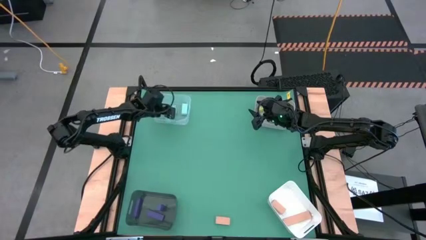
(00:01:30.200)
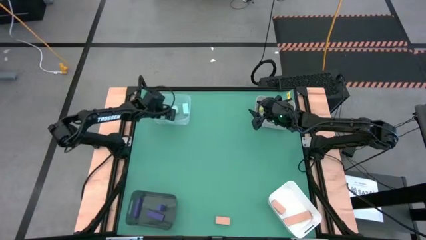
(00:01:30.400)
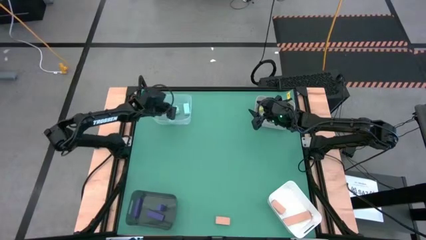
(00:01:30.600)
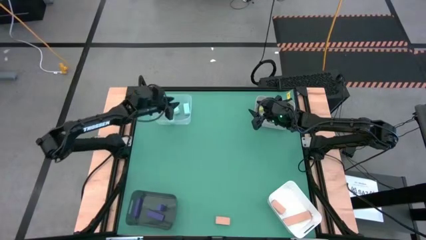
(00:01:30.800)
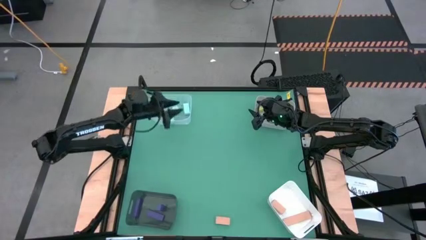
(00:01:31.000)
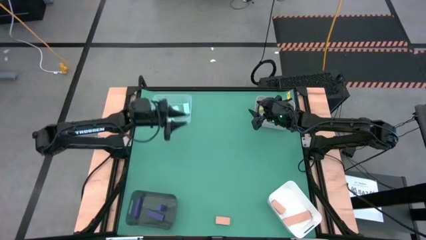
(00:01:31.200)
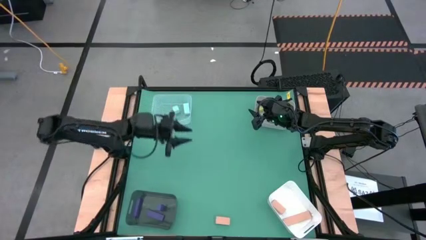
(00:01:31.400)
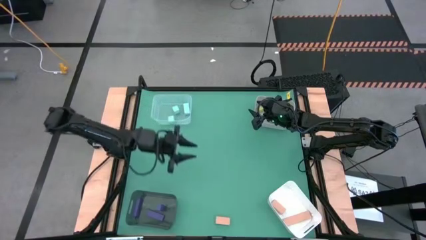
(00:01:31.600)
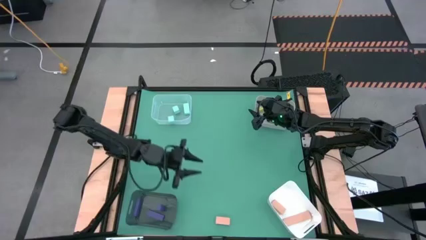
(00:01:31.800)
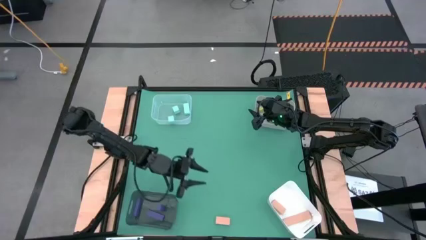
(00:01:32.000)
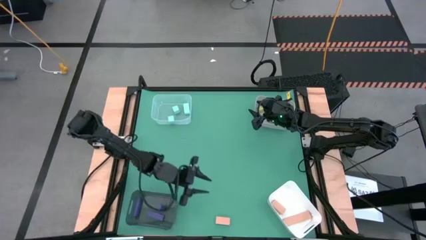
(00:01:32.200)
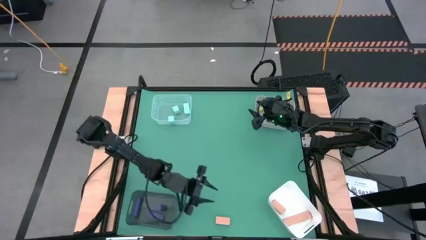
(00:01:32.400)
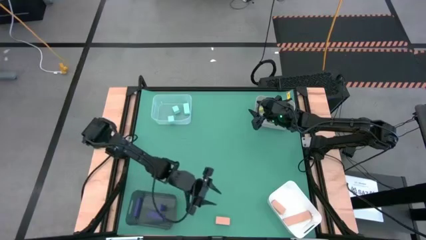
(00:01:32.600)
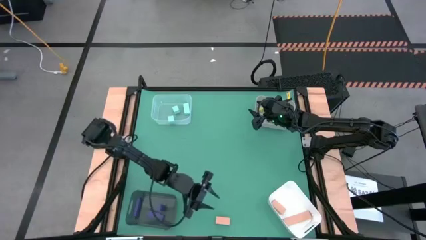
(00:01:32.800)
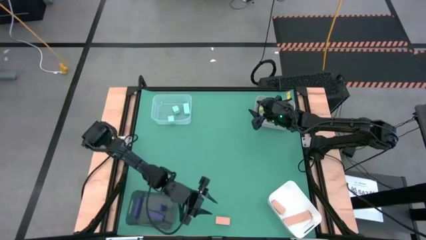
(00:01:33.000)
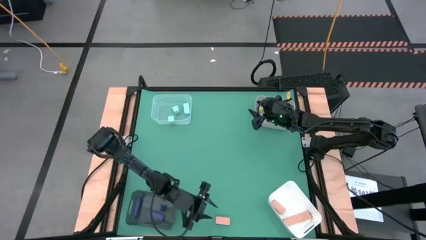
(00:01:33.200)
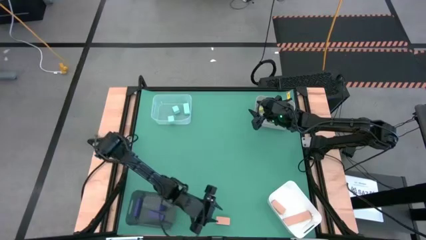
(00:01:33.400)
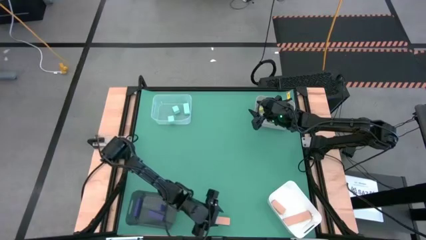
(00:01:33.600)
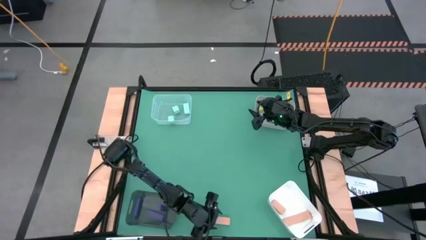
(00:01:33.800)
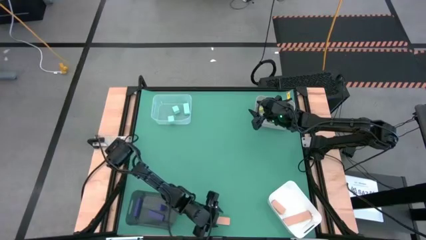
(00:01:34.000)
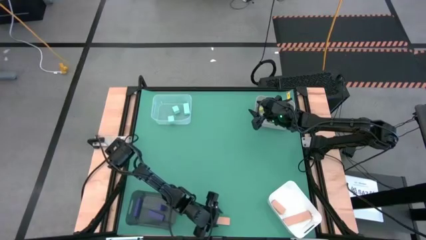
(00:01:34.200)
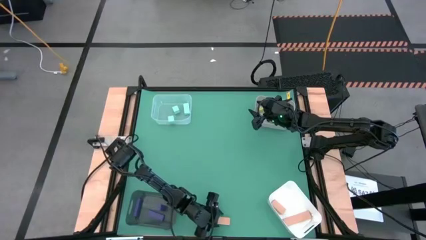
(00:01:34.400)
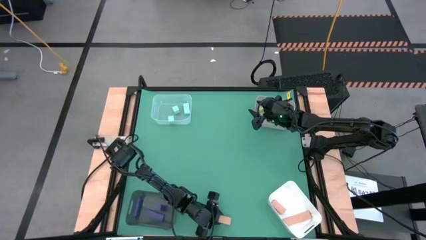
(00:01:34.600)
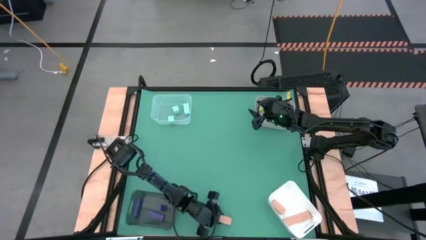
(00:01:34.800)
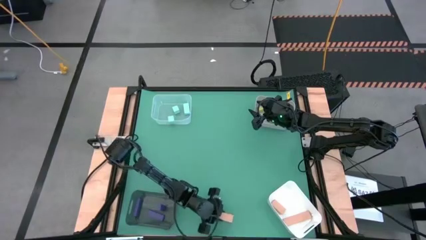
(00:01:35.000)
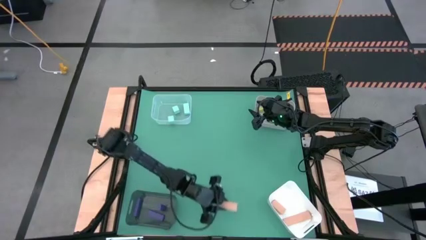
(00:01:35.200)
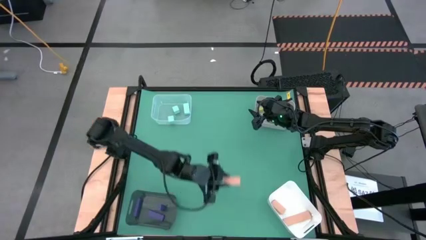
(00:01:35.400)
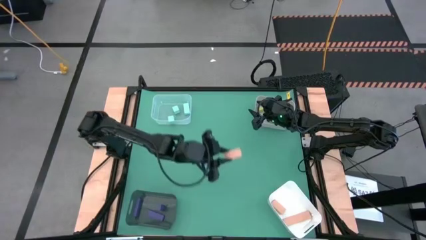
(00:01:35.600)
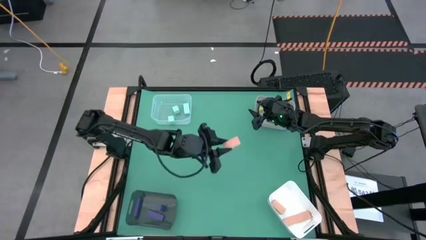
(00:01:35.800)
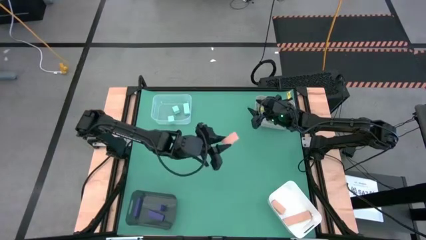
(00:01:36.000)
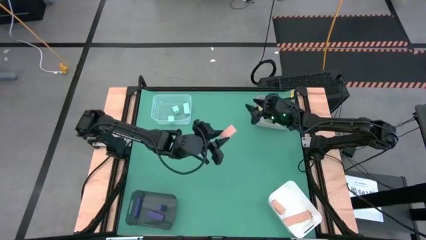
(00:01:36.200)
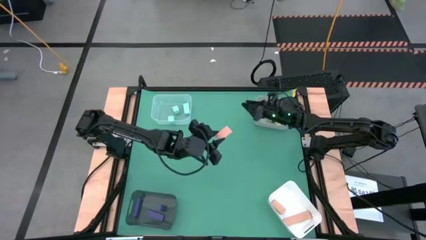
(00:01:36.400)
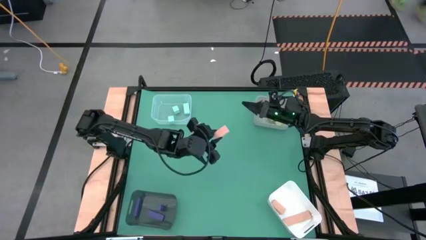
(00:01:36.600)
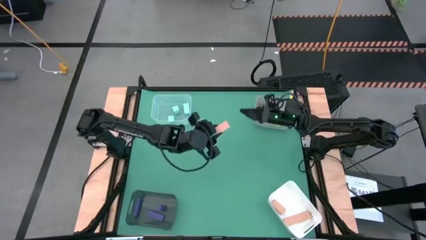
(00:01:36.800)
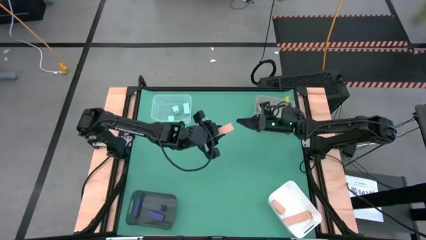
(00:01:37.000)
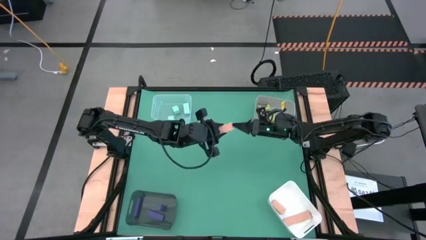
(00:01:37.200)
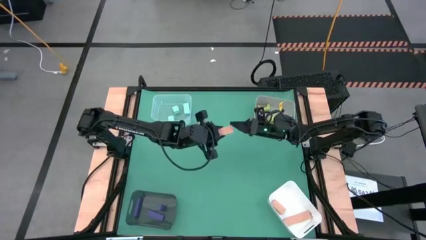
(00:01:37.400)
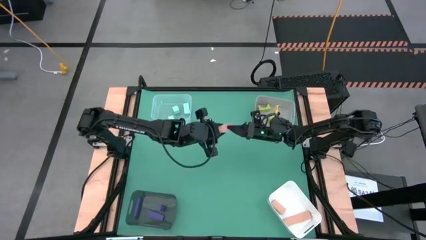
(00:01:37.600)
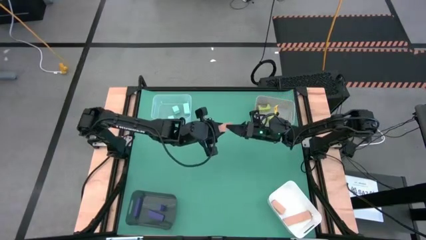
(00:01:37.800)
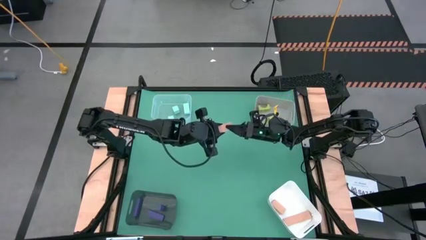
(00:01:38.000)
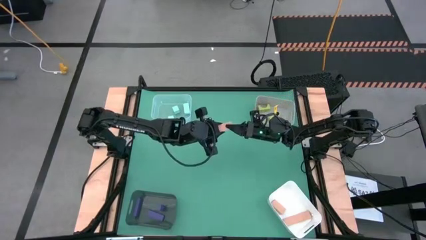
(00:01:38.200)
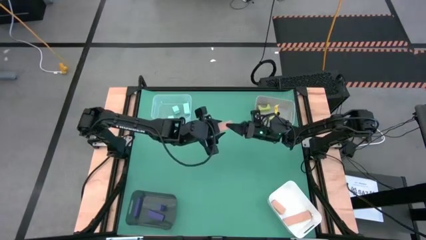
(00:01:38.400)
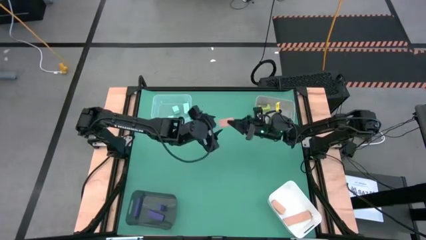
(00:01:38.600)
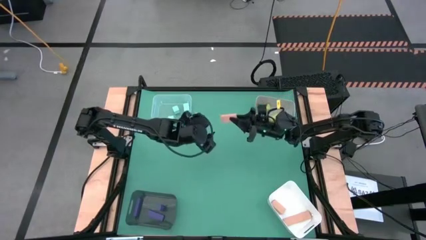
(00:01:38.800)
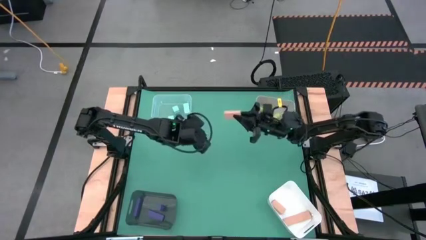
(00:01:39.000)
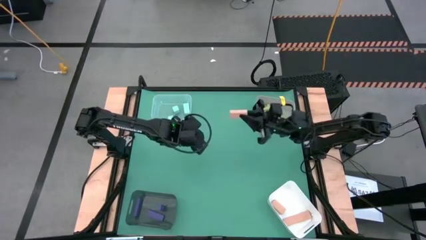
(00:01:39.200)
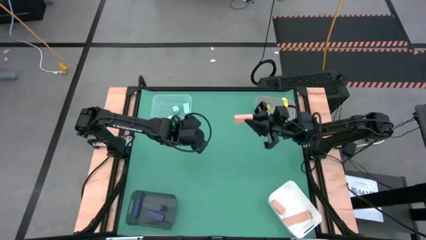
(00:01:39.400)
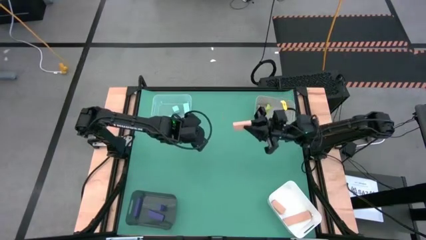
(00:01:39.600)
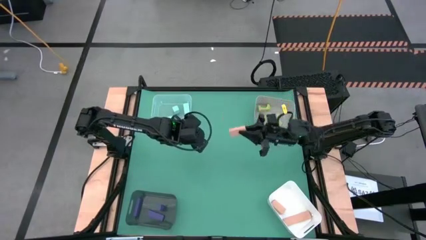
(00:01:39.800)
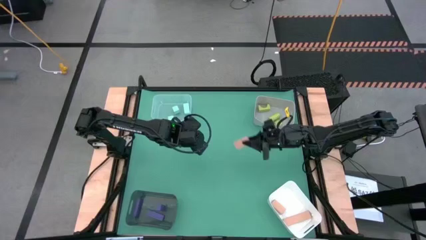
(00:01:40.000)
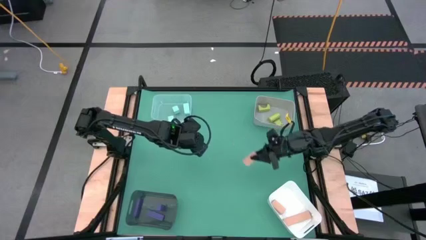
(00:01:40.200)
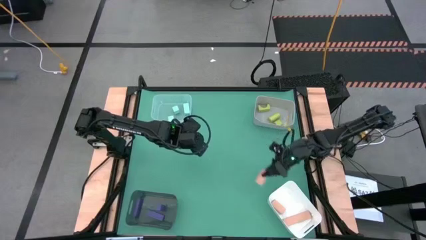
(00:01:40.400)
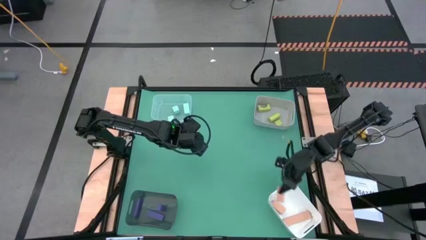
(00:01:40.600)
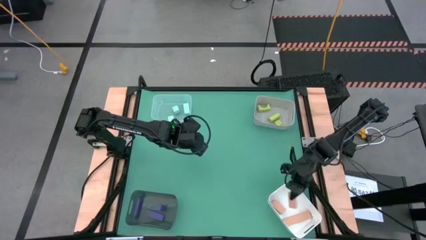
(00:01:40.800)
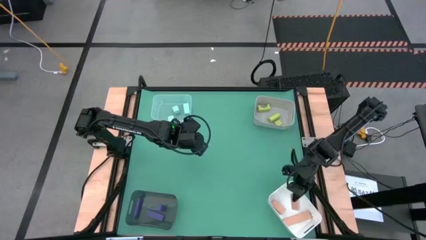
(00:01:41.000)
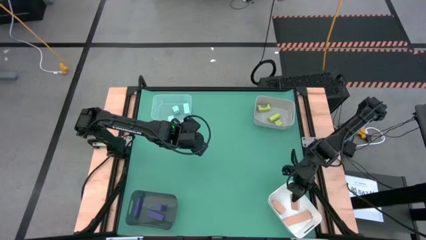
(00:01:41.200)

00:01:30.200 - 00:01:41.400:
Task: Sort & place blocks by color
Put the brown block into the white bin

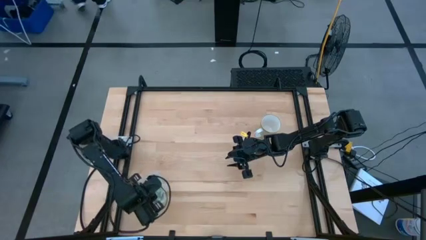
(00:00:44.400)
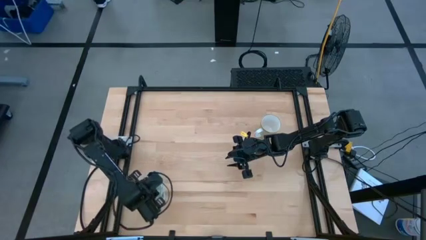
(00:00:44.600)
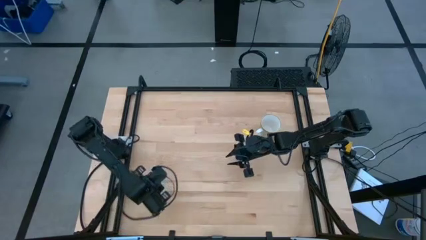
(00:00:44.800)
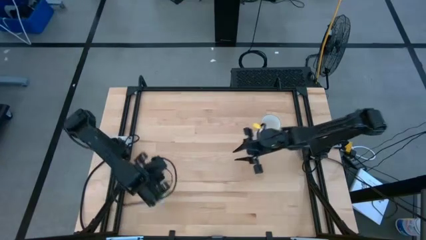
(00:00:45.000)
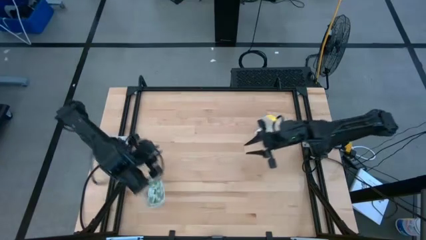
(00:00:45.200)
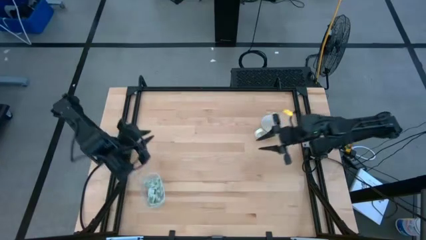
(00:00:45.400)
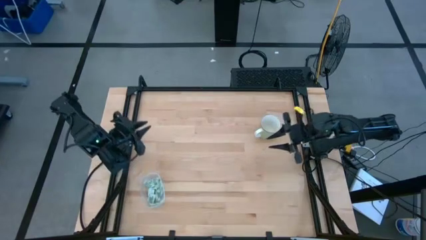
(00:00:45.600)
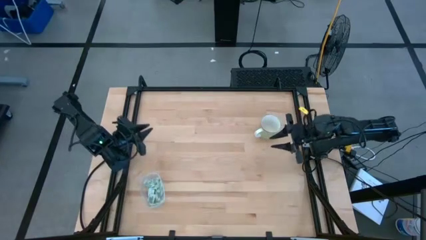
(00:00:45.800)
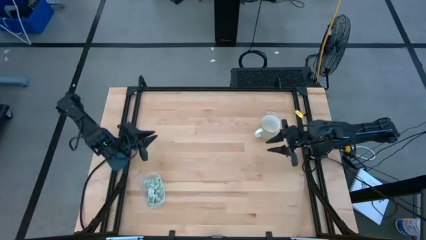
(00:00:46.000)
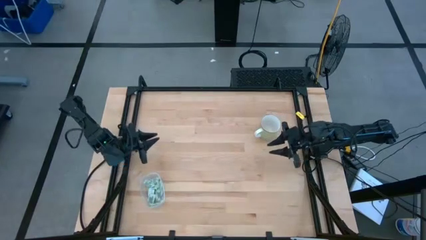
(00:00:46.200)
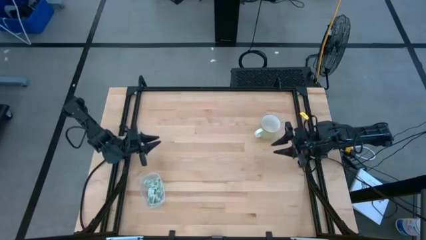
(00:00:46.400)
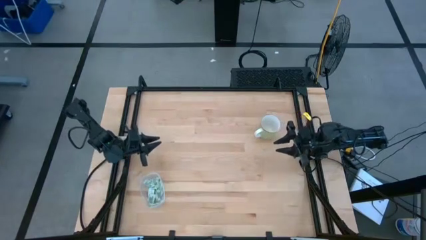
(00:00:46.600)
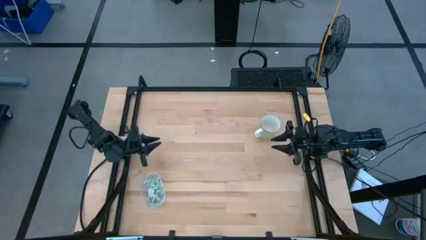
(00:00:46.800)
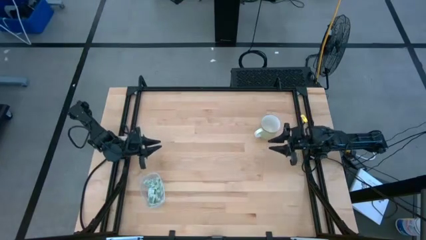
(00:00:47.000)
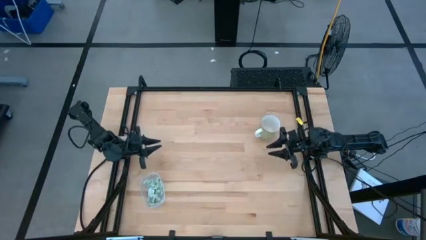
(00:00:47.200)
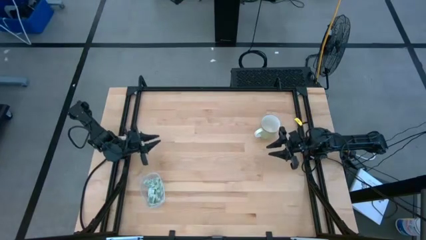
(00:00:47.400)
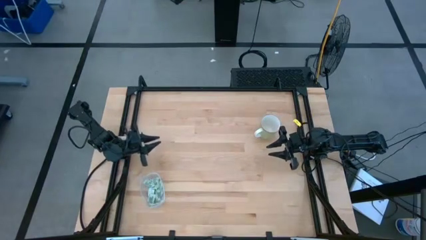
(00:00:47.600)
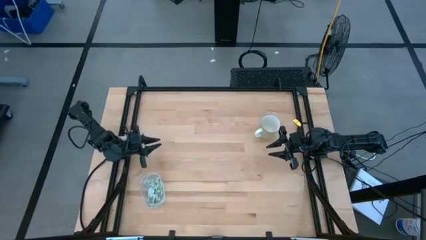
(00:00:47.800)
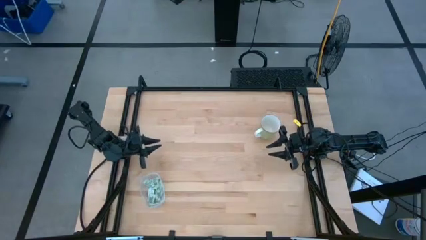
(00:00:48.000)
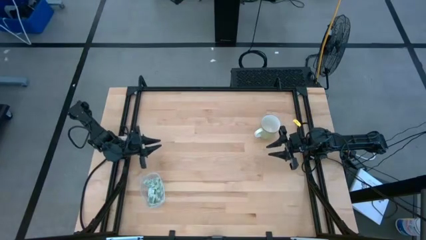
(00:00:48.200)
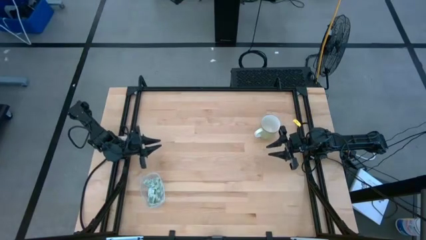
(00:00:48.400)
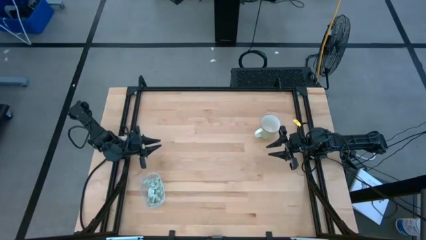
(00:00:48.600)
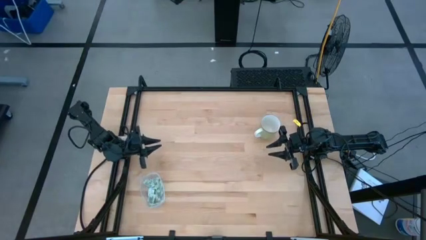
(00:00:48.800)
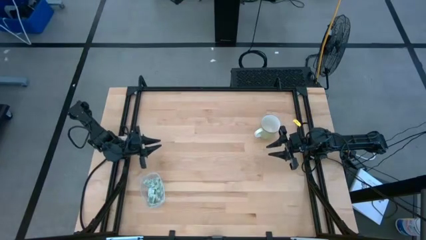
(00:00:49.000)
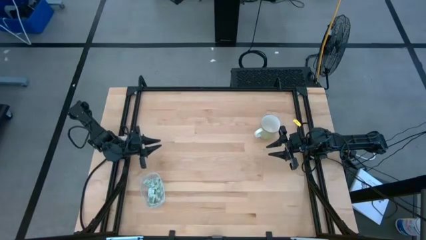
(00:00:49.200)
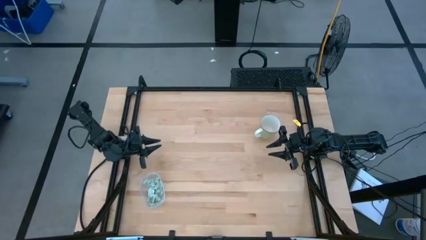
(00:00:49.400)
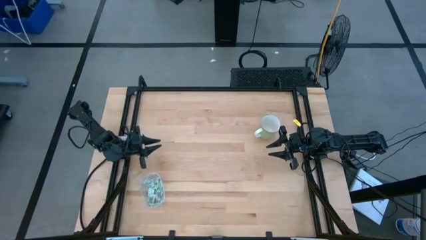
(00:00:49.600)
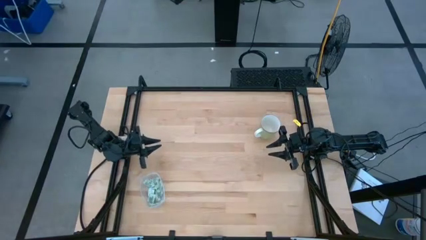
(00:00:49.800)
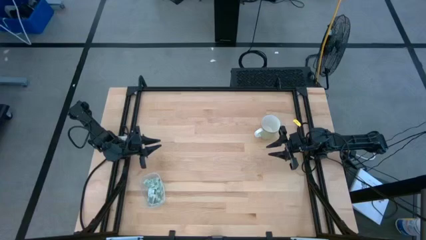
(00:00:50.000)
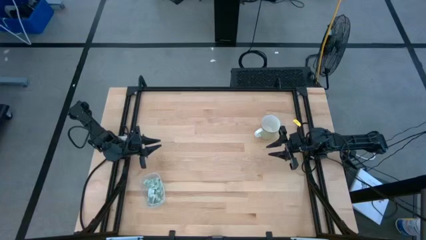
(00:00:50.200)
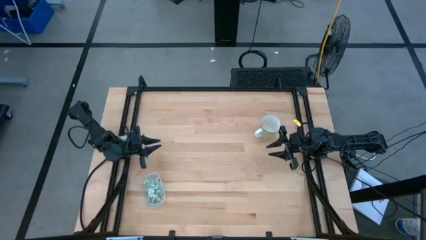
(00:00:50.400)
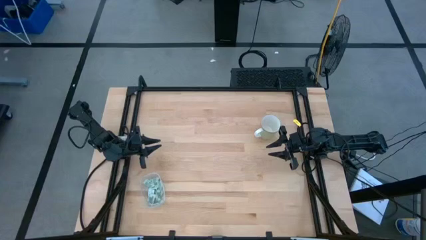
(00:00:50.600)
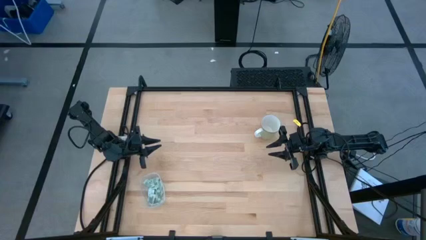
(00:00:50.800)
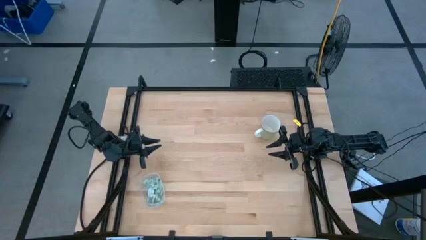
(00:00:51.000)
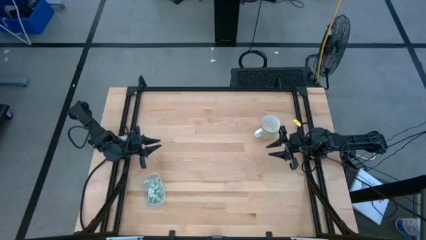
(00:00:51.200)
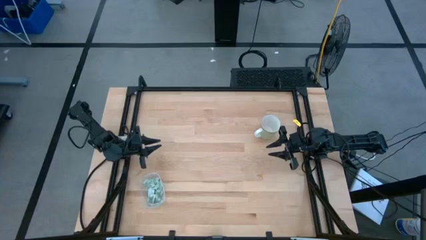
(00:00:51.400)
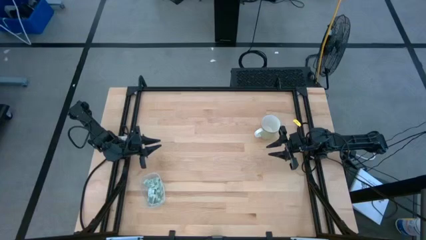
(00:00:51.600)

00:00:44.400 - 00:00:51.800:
Task: Pick and place Stevia / Truvia into bins
Return to Home Position
